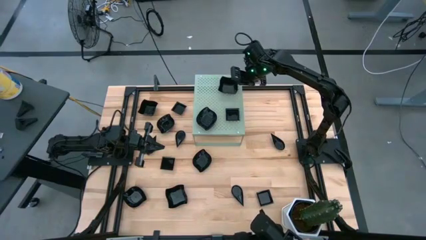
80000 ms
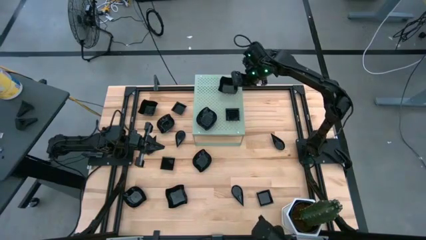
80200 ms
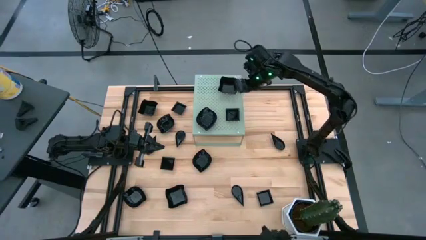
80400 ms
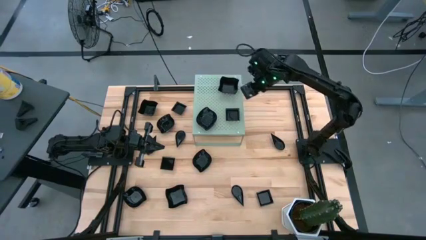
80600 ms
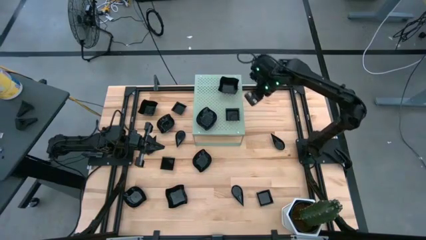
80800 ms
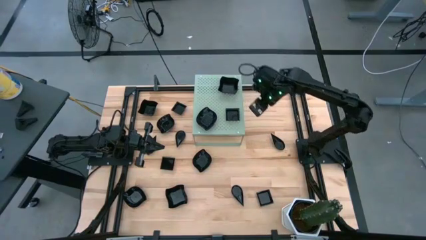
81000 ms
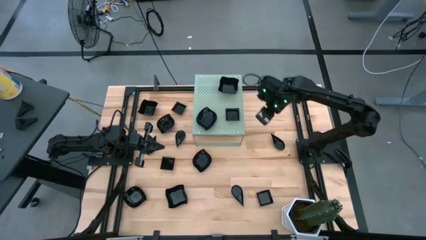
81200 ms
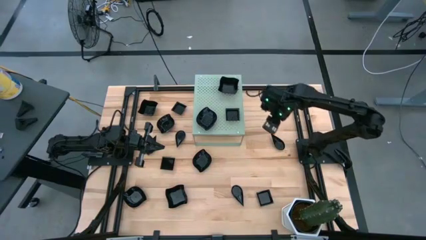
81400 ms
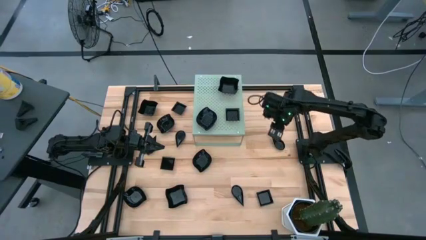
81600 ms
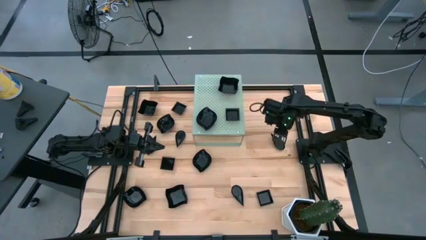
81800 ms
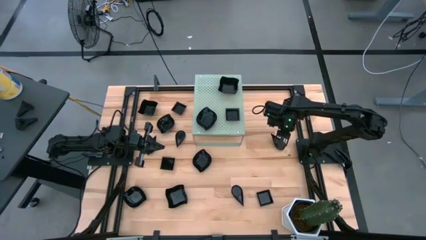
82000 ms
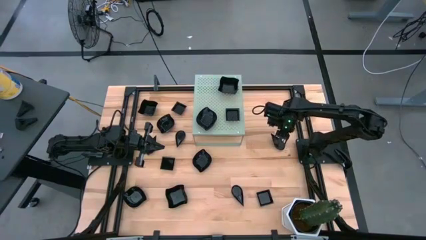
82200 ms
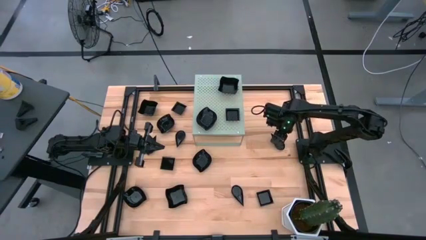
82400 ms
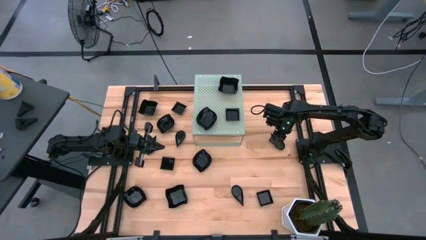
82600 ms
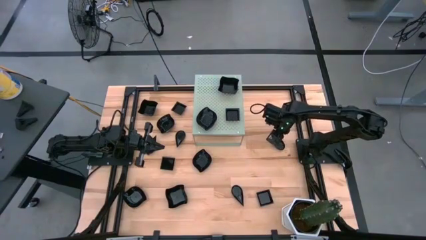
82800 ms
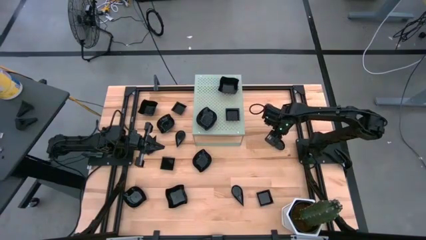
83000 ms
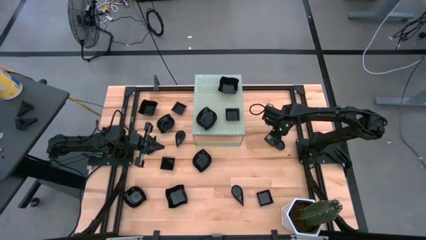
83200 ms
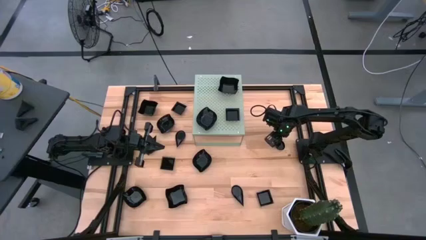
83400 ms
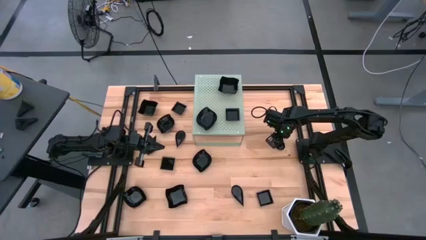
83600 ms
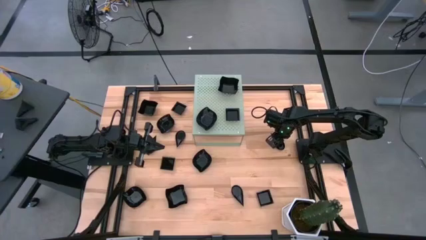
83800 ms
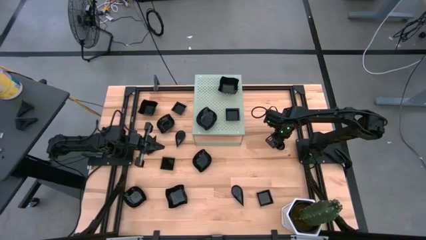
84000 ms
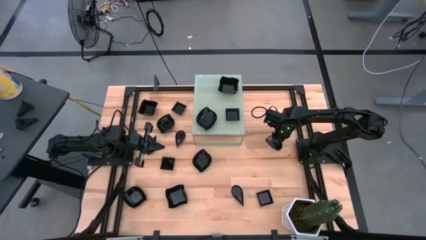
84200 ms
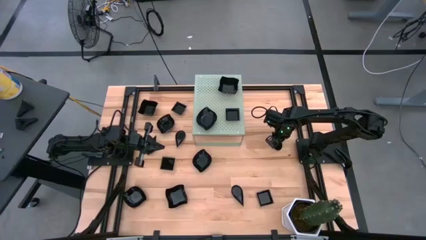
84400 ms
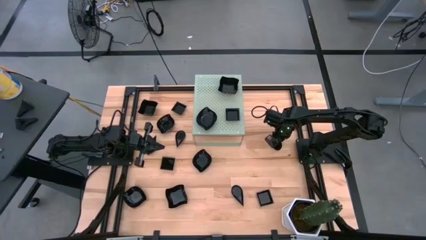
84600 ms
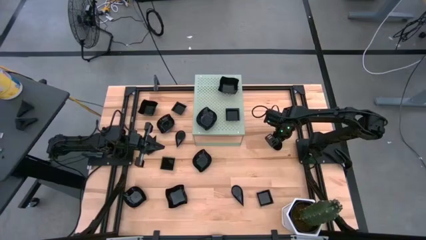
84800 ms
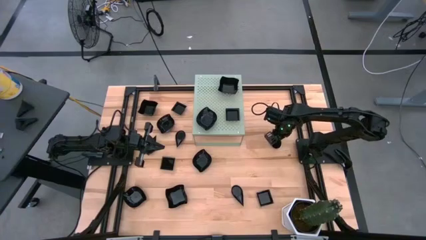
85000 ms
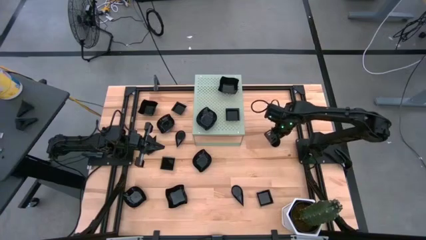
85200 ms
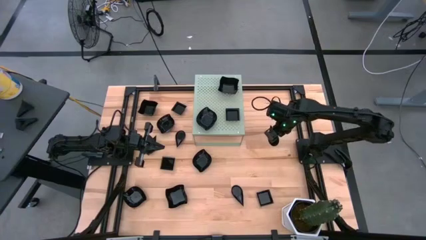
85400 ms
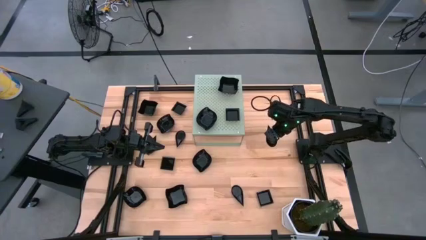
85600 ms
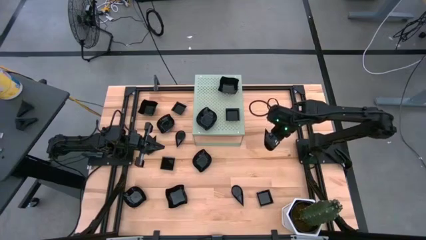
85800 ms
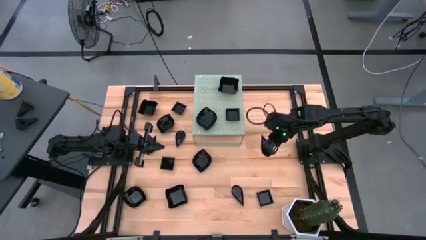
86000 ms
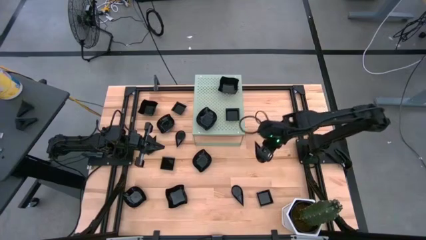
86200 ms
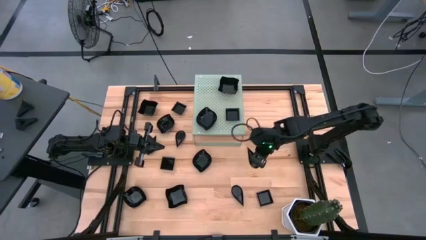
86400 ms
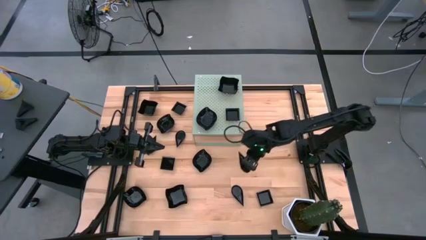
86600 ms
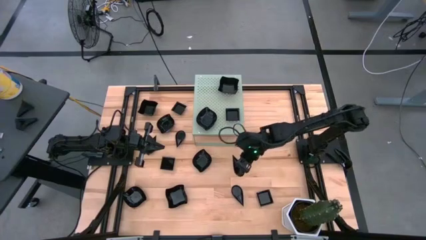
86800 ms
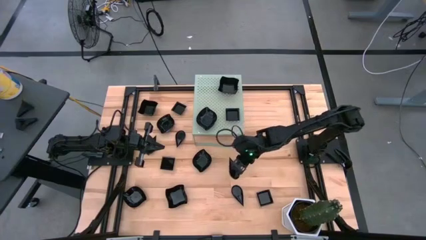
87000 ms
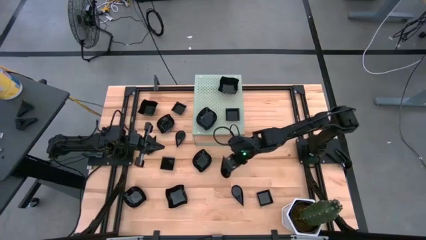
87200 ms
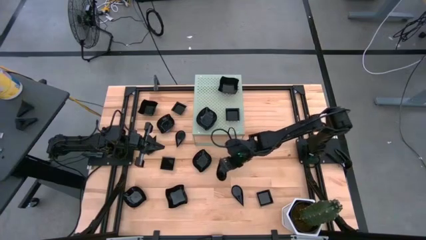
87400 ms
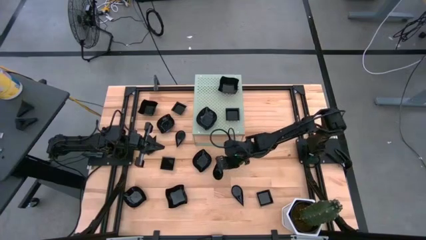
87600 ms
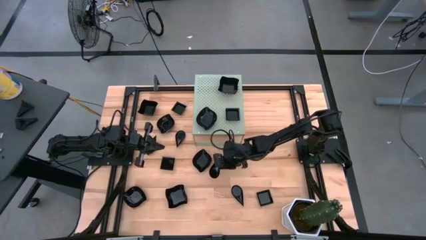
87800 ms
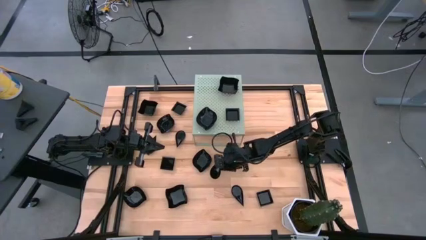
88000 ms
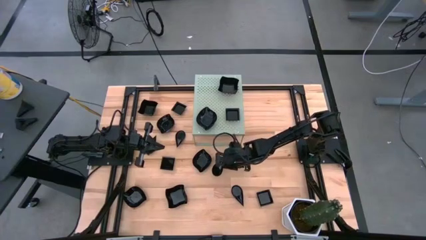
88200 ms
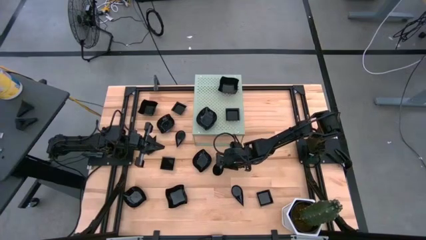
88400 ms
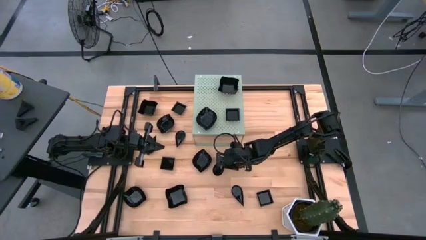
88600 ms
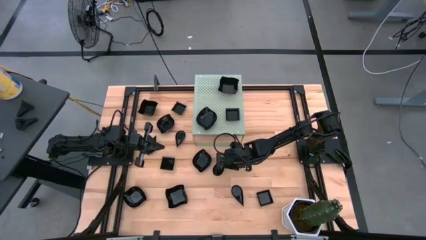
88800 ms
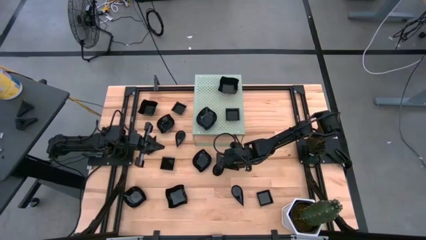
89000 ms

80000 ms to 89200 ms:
Task: Pick & Place Mini shaped plates
Move the drop shaped plate to the center of the table

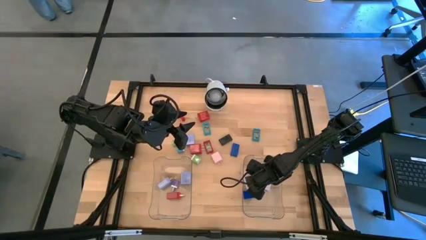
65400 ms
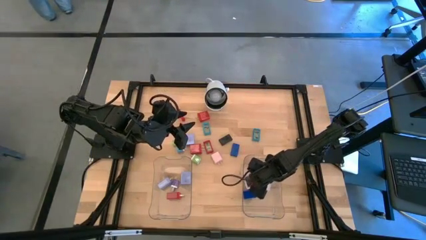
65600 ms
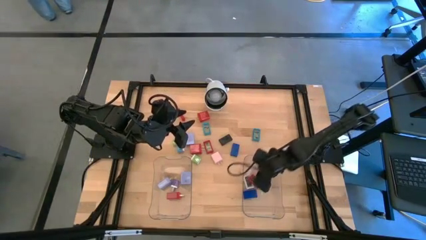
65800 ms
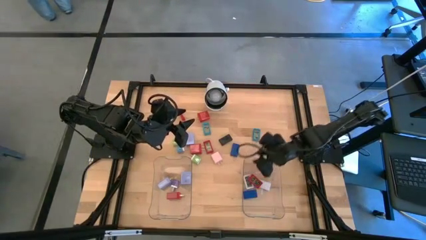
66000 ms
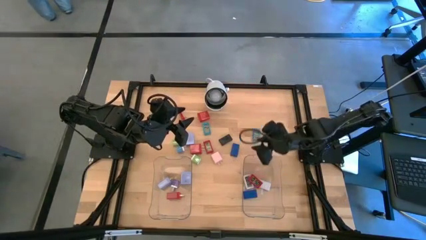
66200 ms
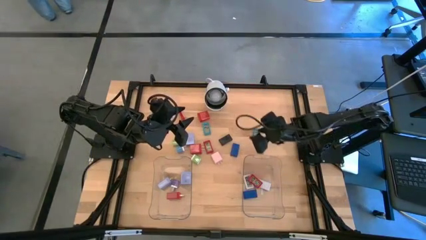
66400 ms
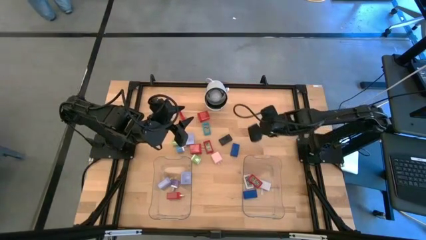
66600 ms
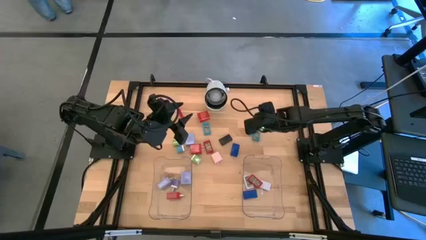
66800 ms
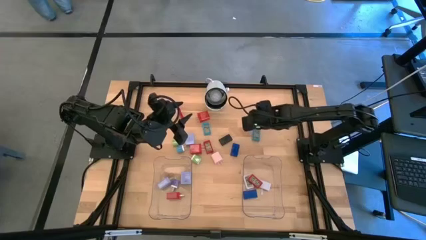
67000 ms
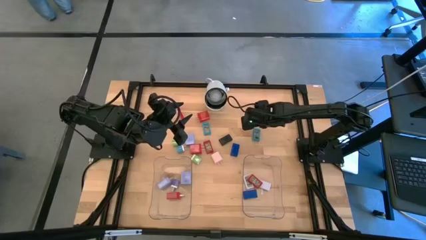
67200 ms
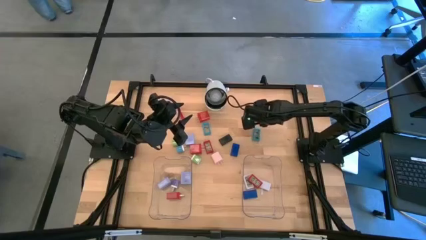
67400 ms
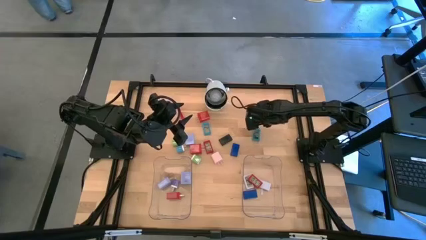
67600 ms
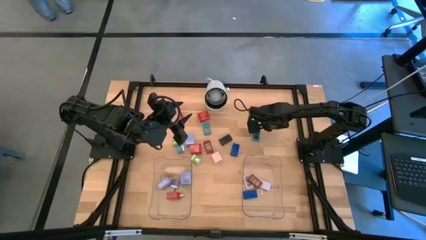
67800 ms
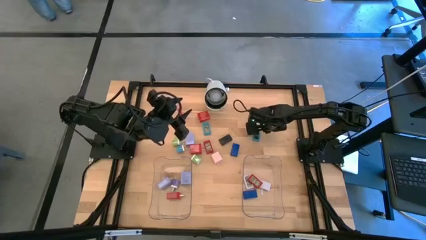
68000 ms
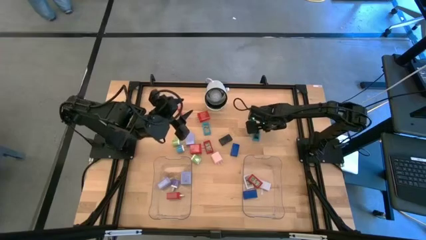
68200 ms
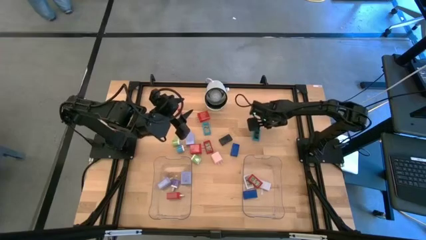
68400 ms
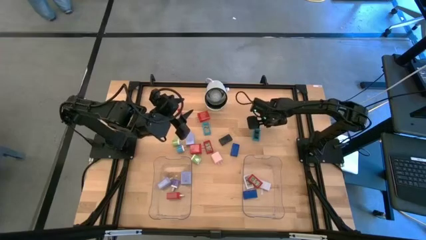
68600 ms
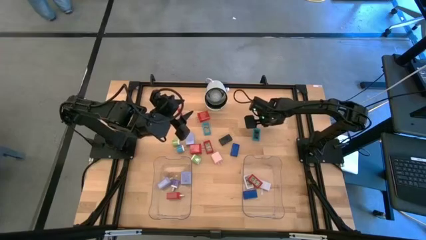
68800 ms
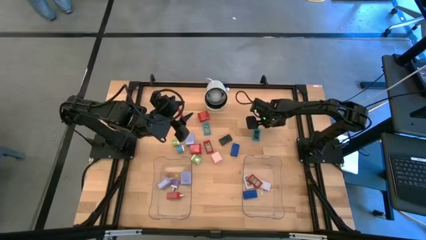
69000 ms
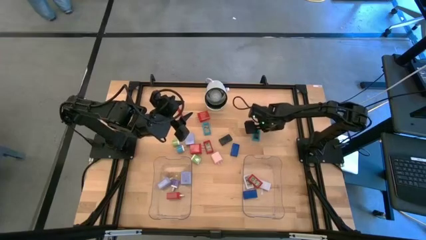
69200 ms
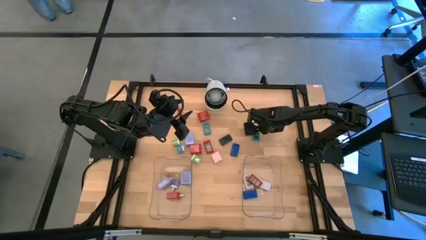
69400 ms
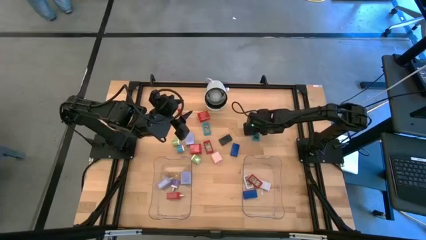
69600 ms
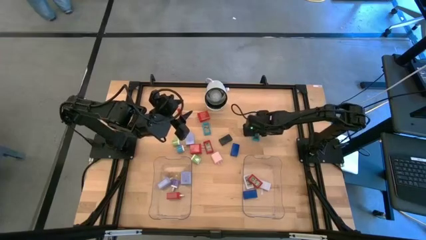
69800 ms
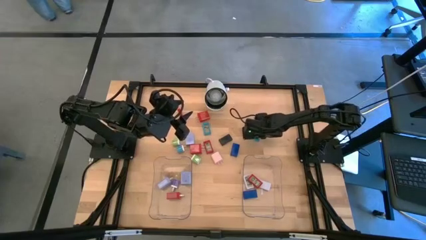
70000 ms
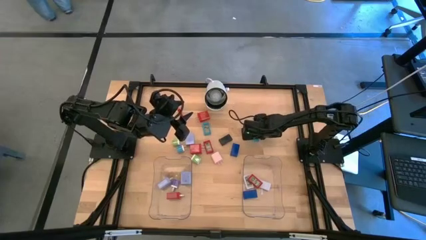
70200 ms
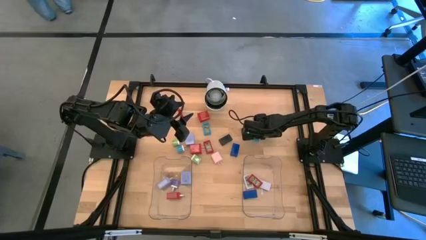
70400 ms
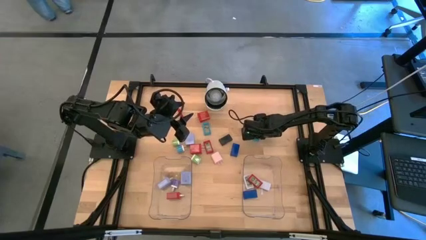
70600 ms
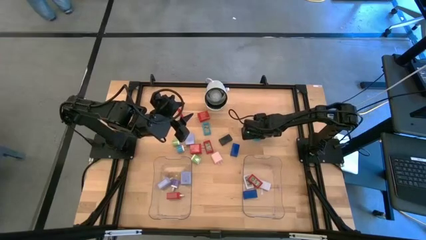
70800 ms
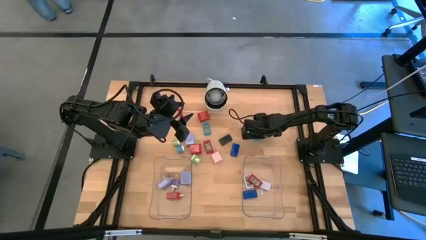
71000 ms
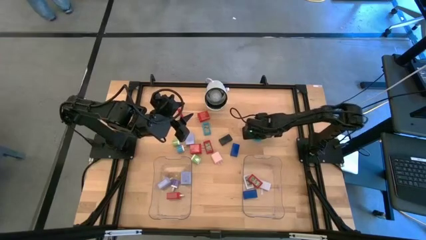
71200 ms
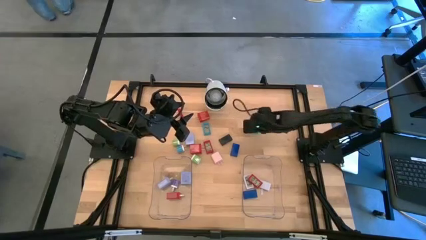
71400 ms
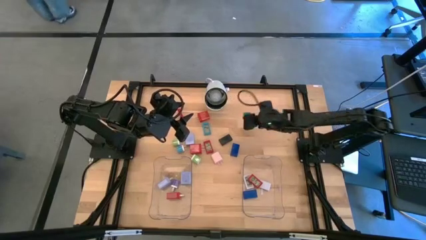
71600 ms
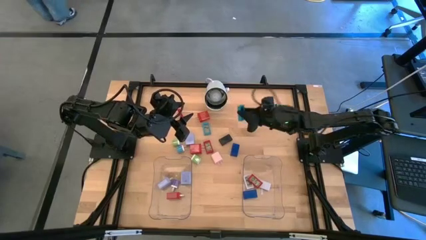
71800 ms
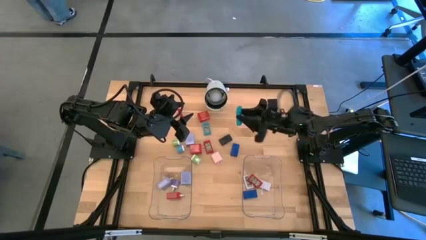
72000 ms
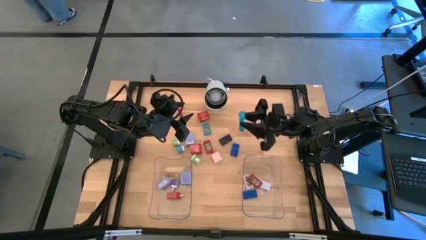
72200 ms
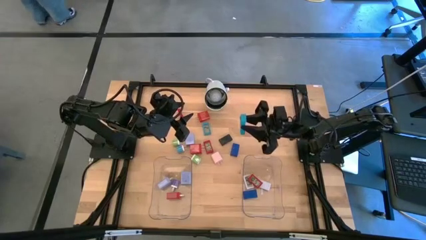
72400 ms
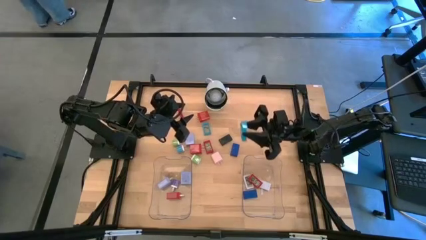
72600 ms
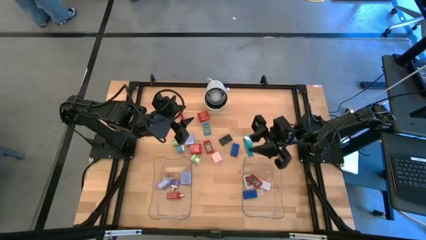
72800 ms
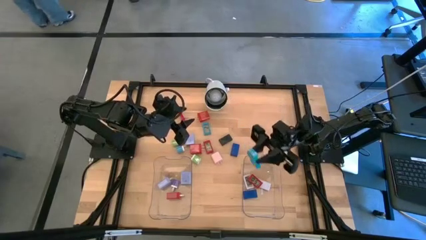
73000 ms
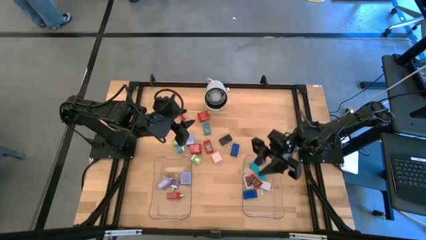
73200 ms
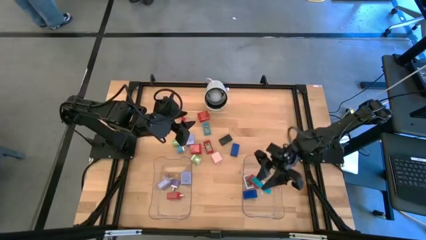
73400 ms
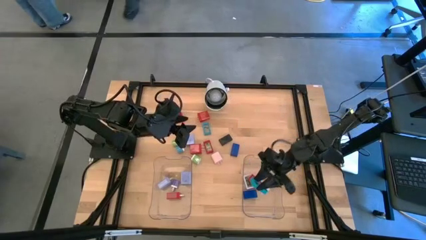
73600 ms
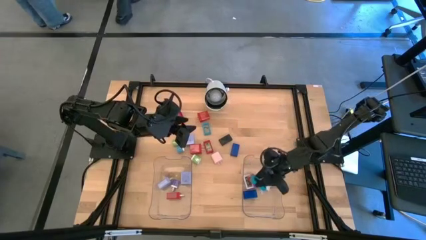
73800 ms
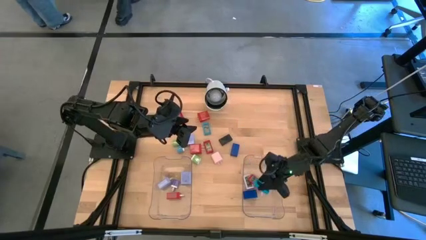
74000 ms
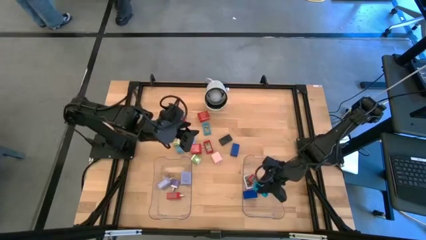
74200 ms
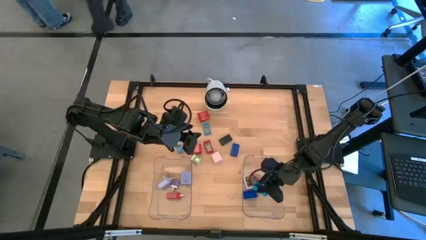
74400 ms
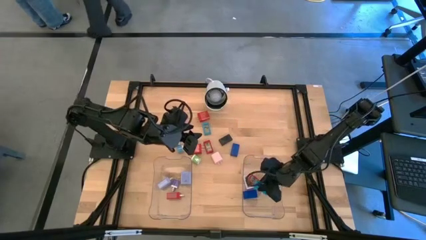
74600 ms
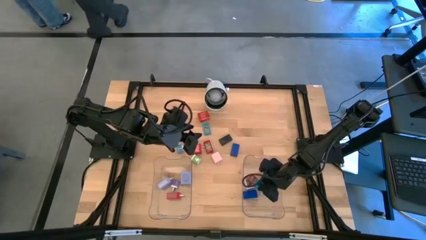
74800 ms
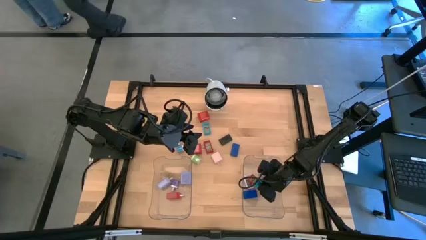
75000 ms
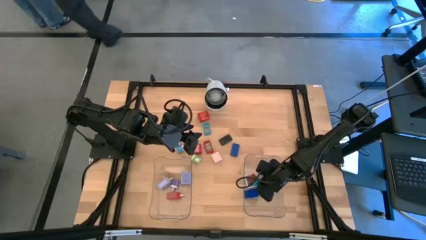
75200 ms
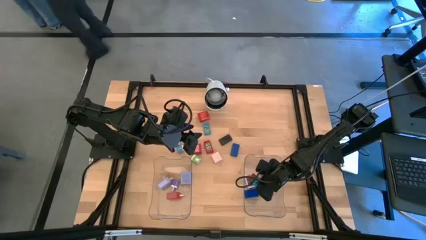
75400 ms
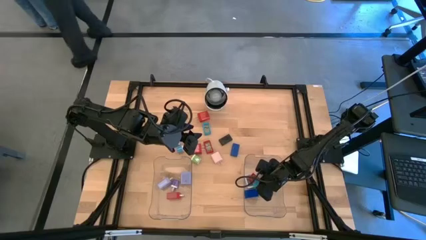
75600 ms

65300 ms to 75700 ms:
Task: Pick & Place Office items
Put the right light blue timer into the right transparent bin
